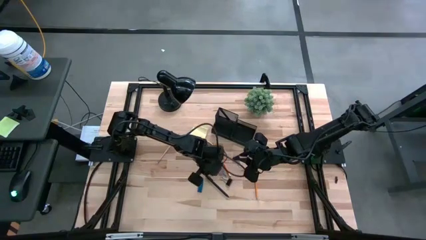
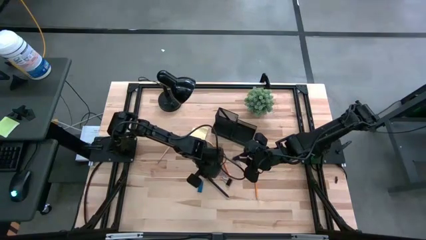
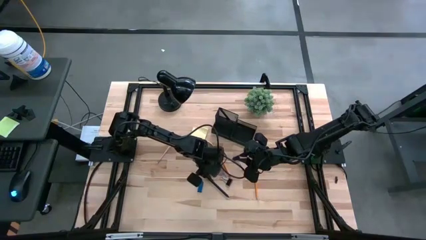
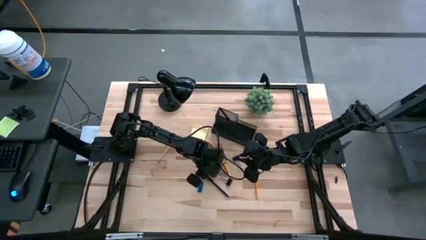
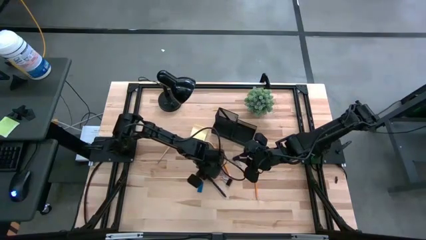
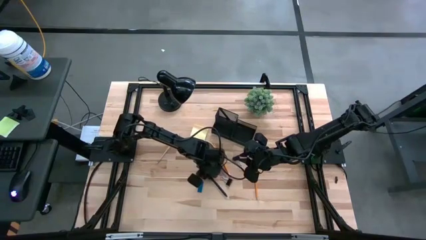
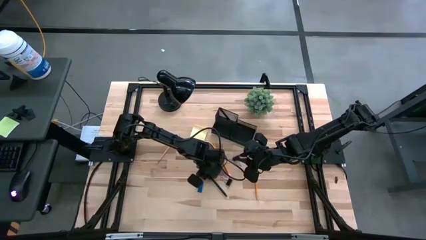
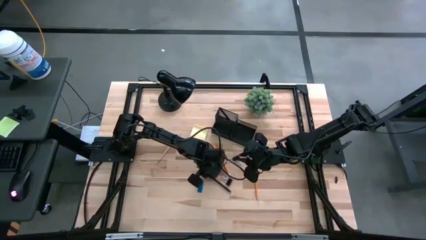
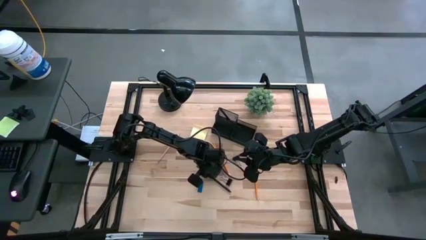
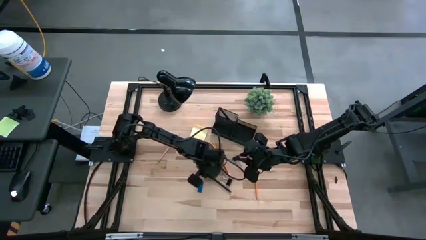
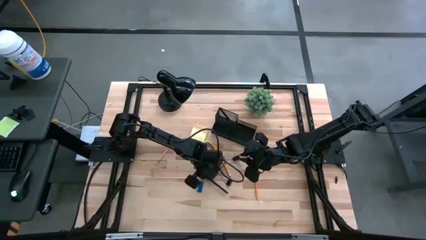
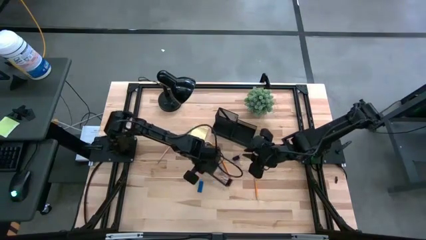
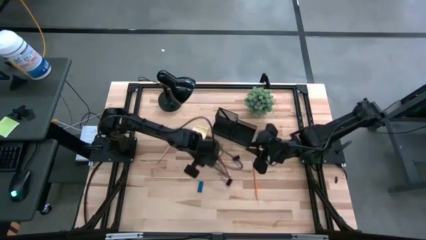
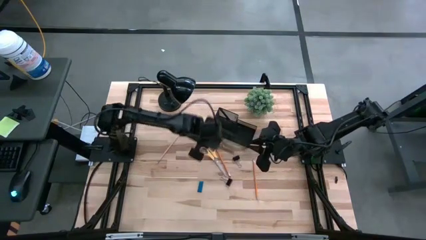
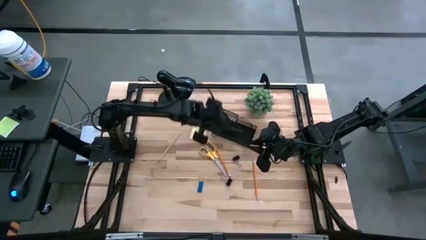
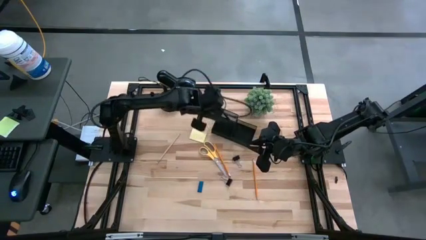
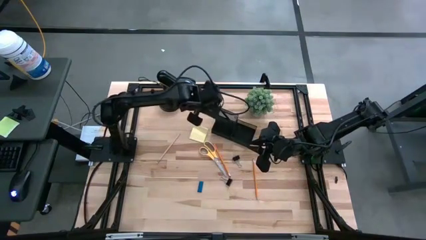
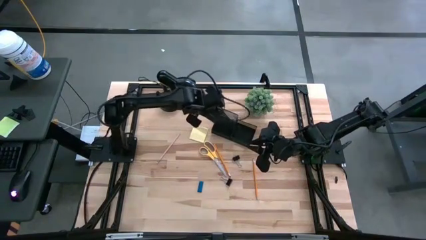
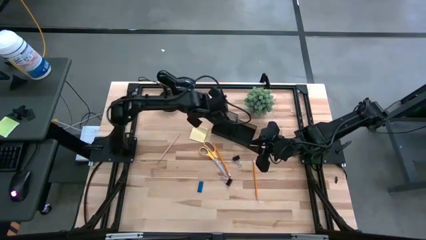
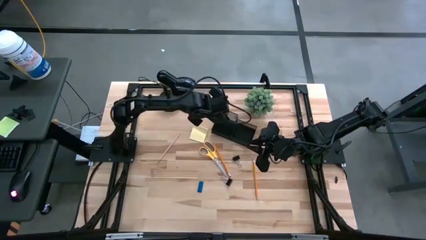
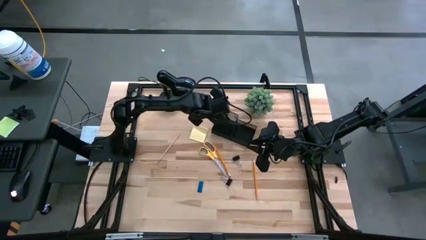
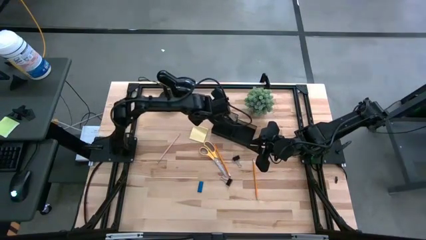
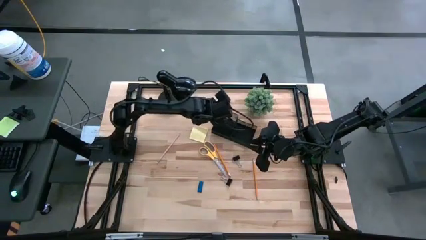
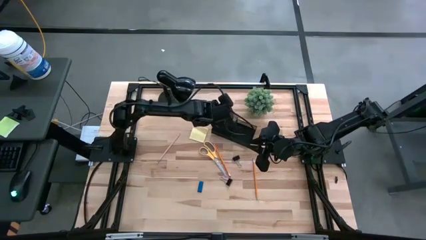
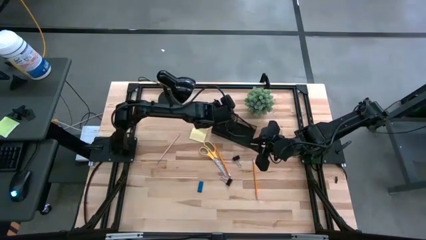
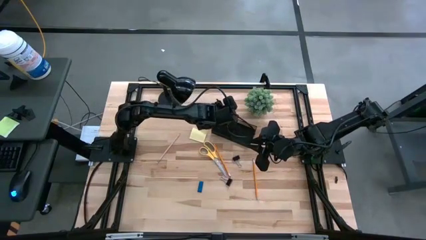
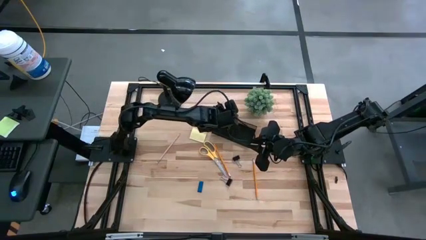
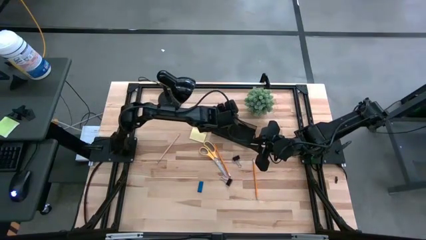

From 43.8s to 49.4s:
Task: Pick and place office supplies into organizer
Put the pen into the desk organizer

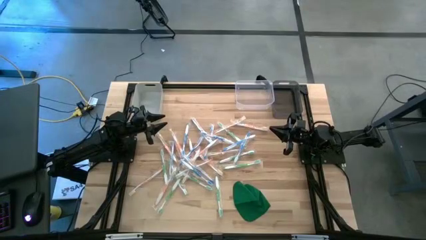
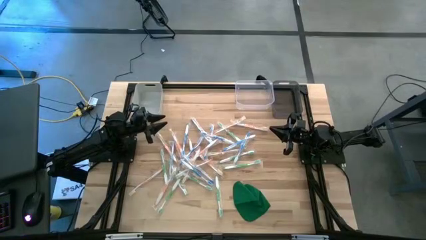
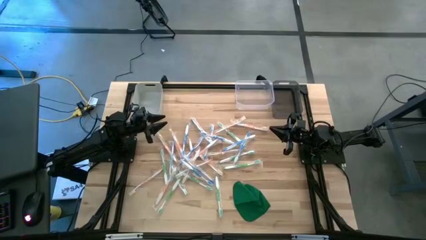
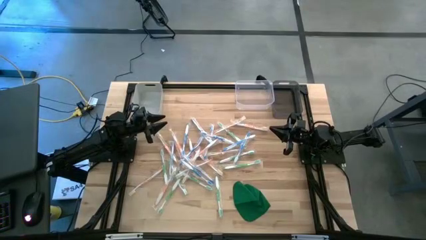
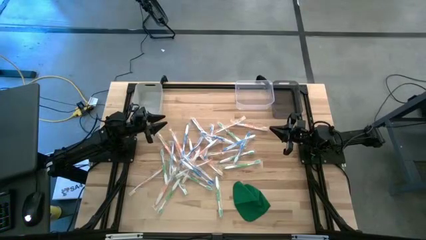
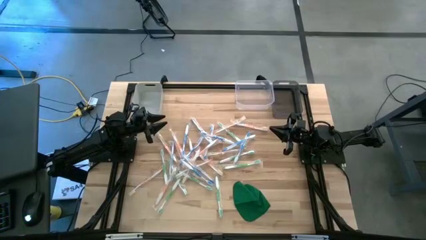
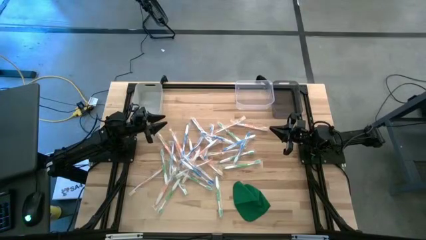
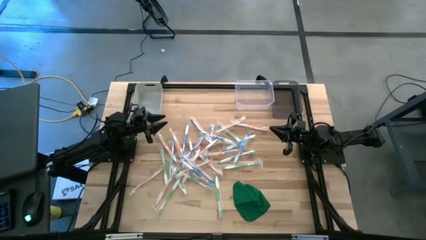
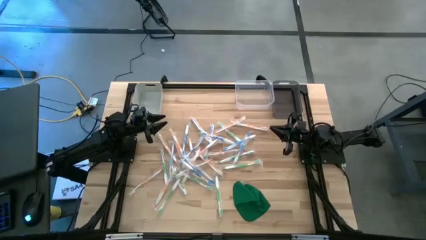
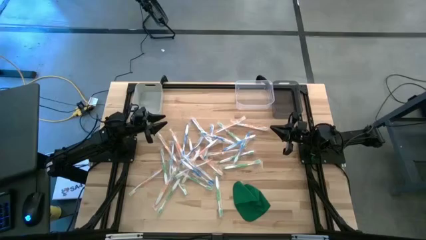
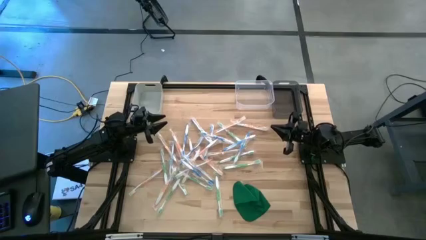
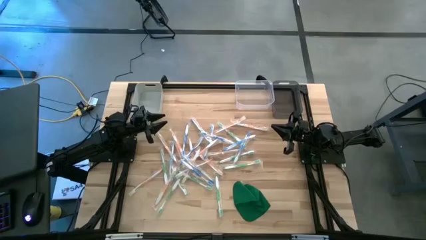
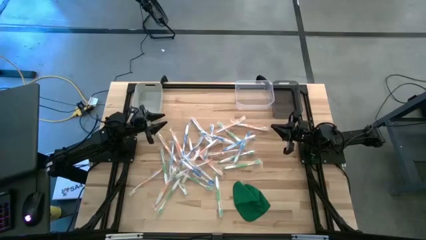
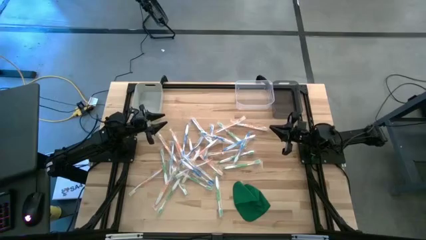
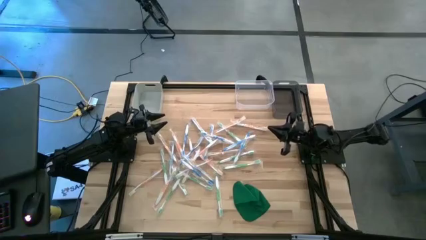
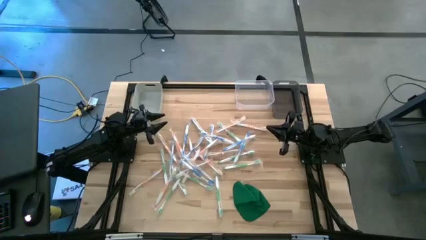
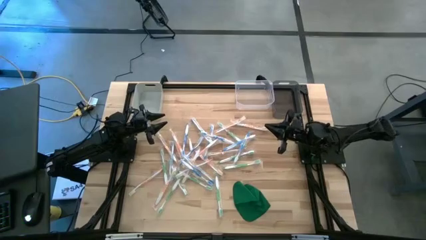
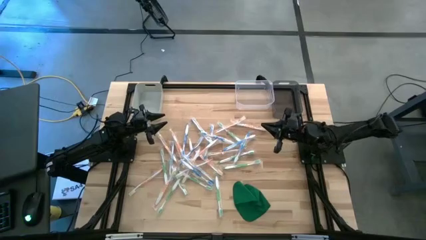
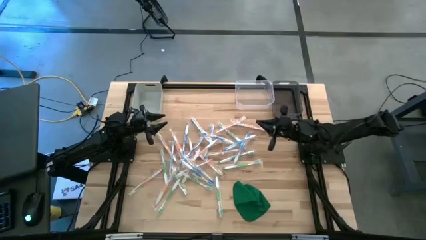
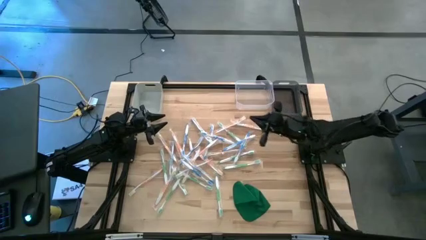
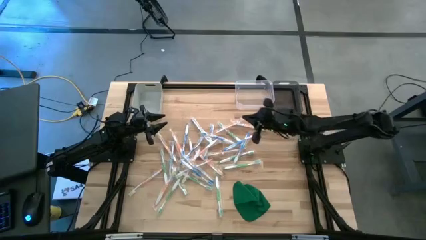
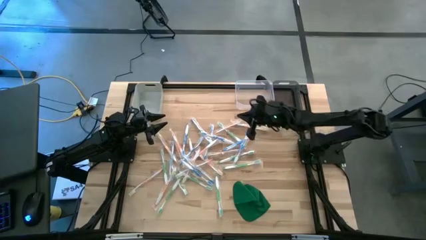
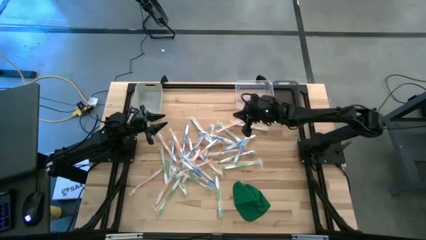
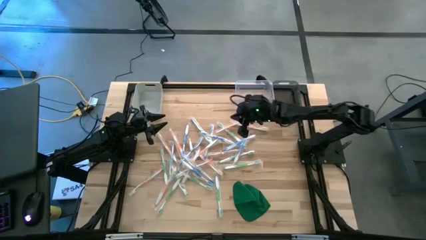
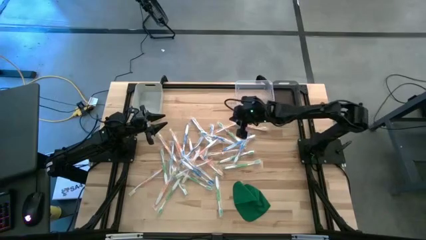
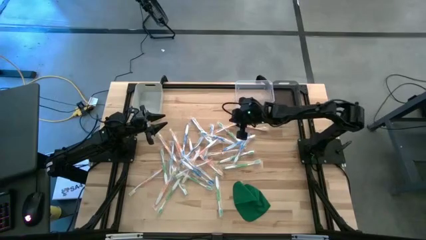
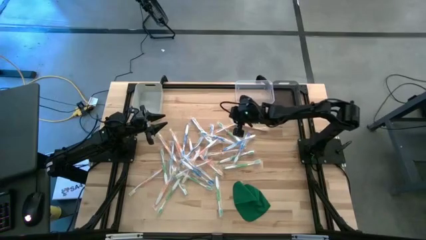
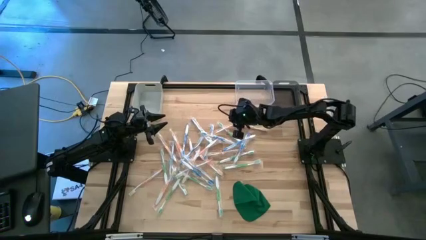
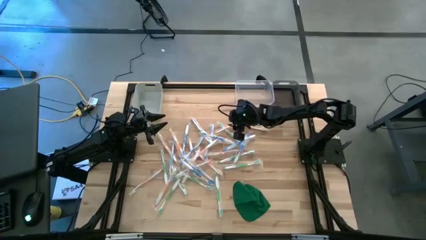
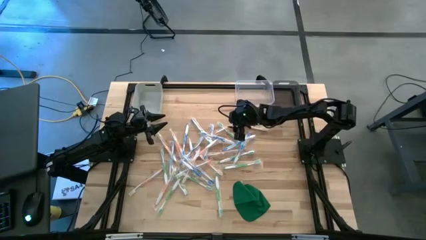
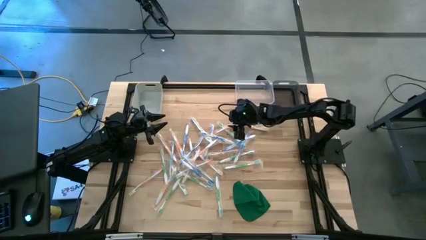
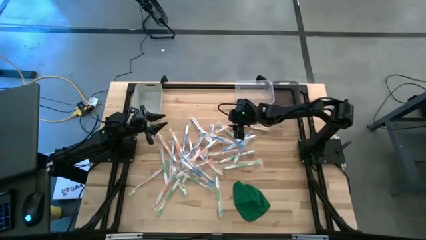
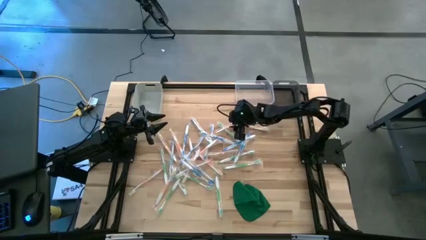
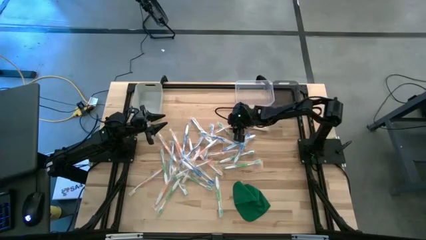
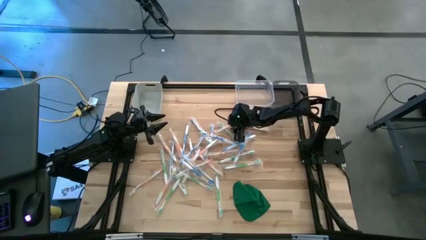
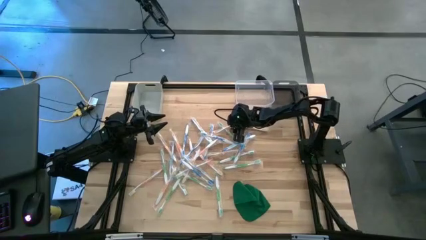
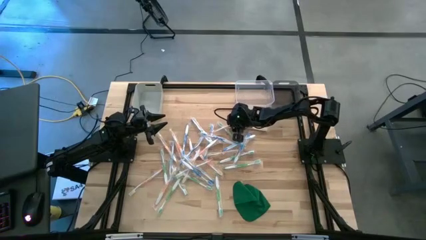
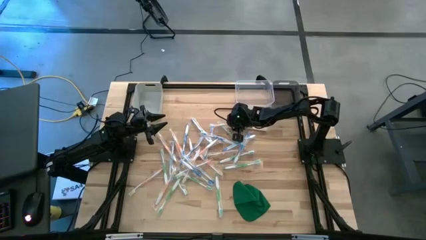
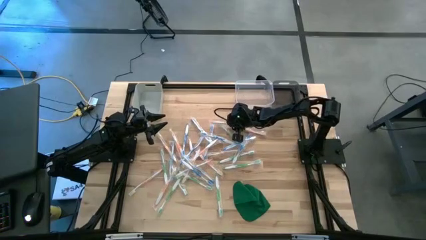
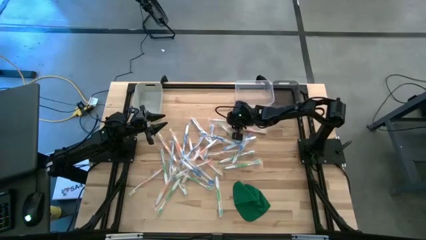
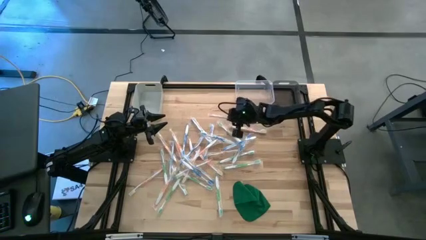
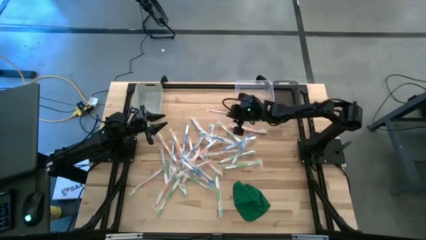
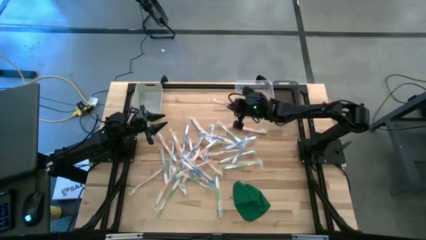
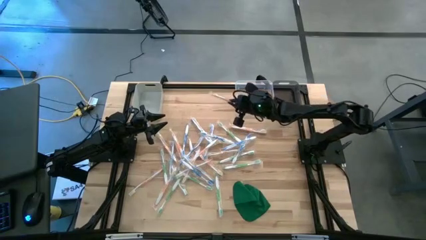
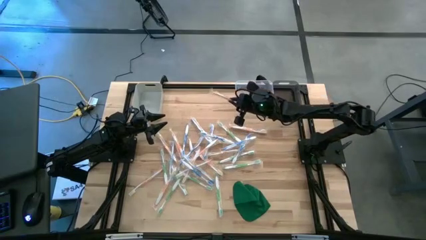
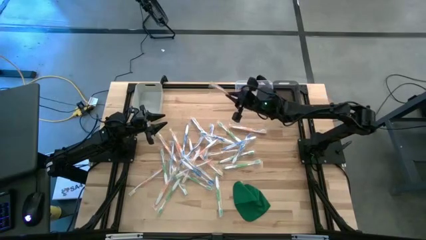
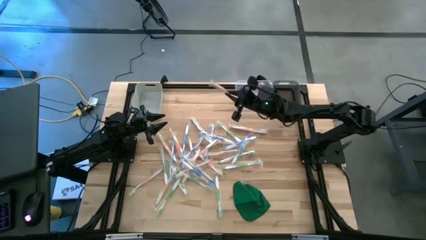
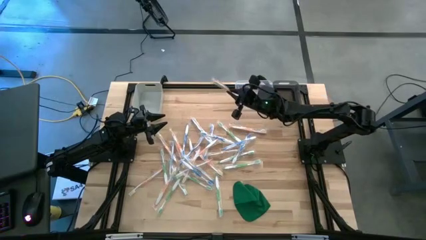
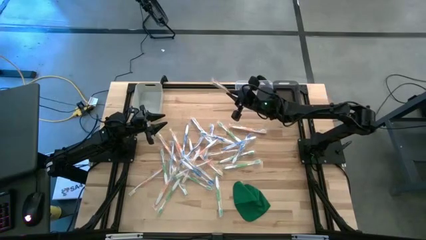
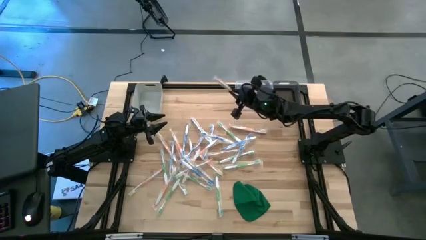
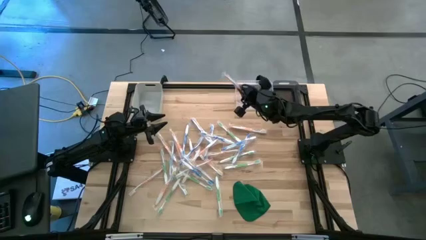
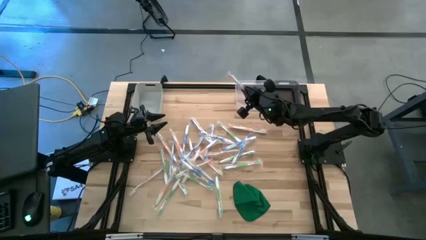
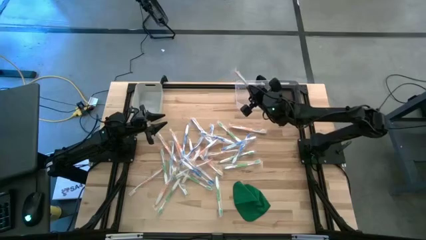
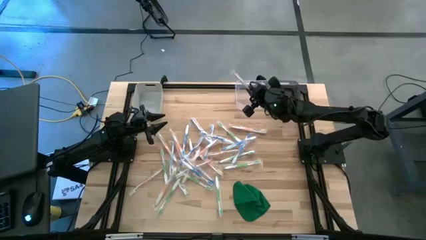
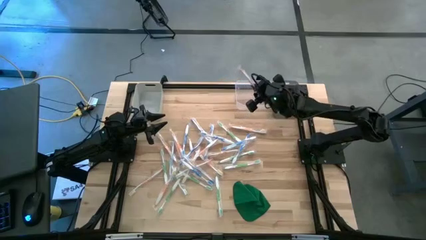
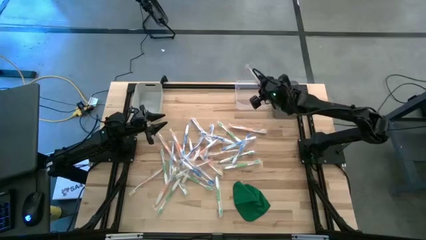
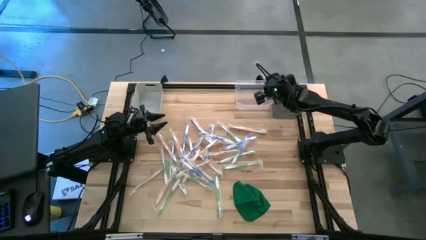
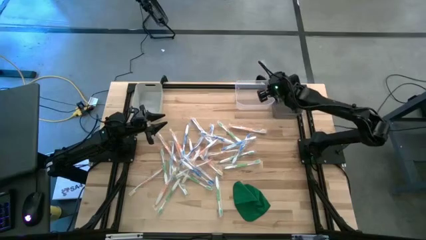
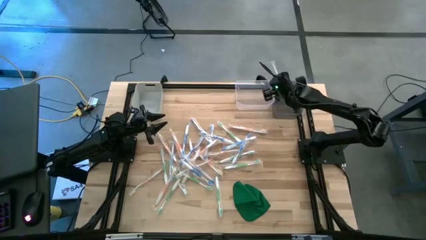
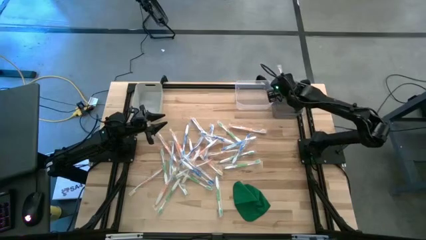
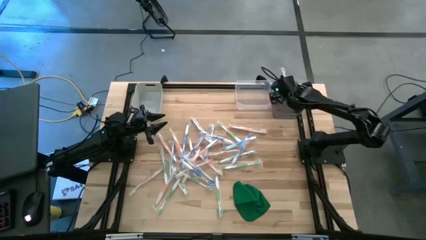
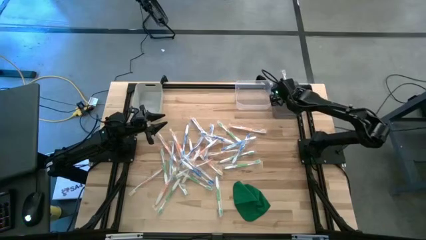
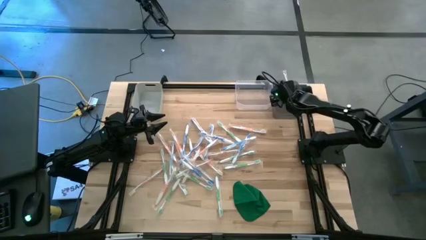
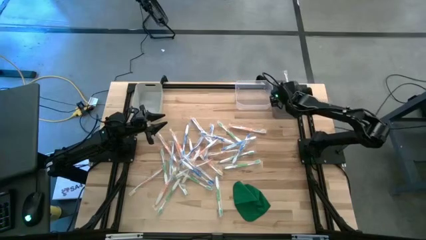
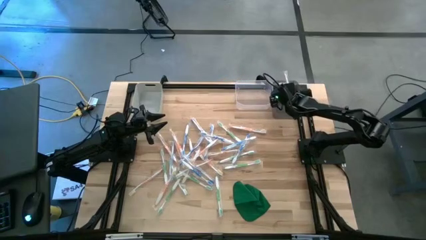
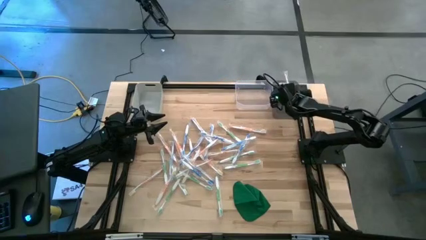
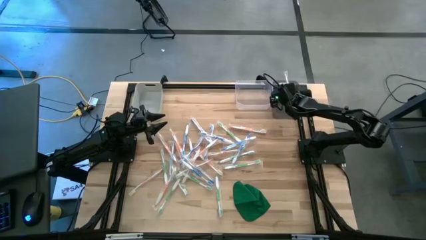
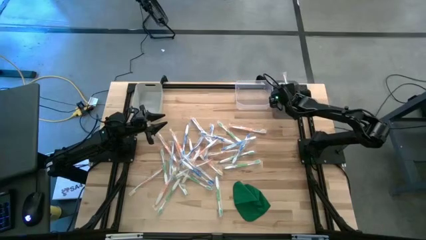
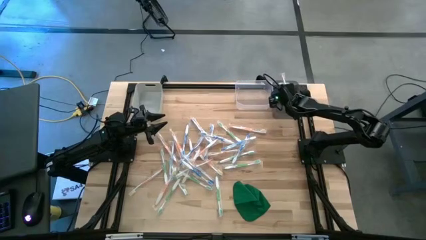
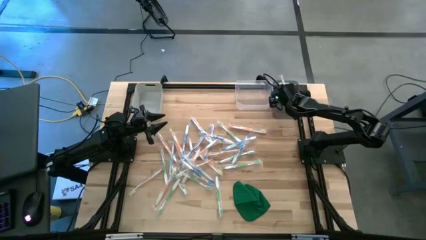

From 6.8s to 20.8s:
Task: Pick & Place Toothbrushes
Put the orange toothbrush into the black bin
